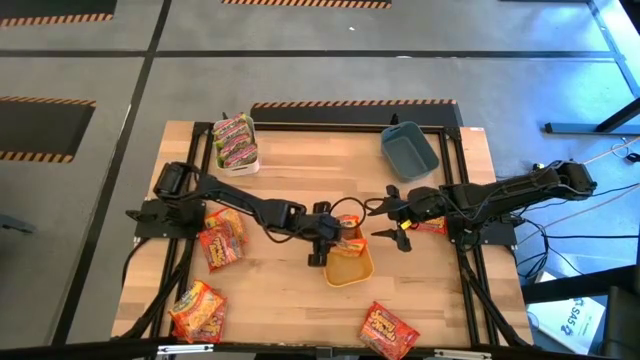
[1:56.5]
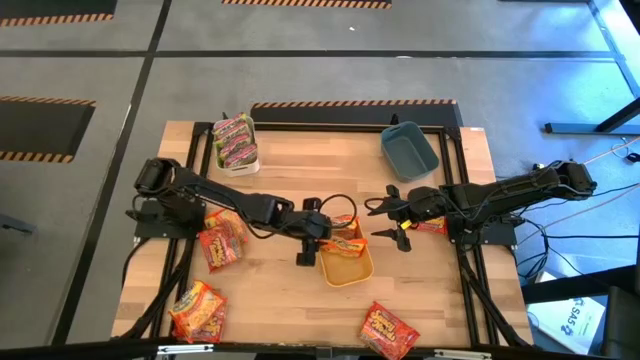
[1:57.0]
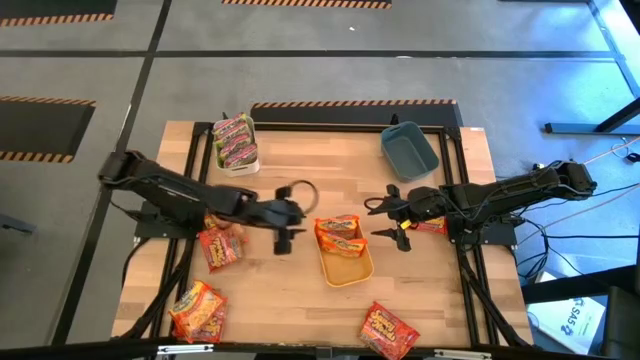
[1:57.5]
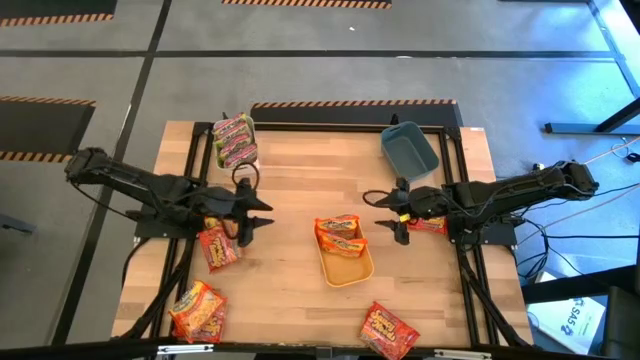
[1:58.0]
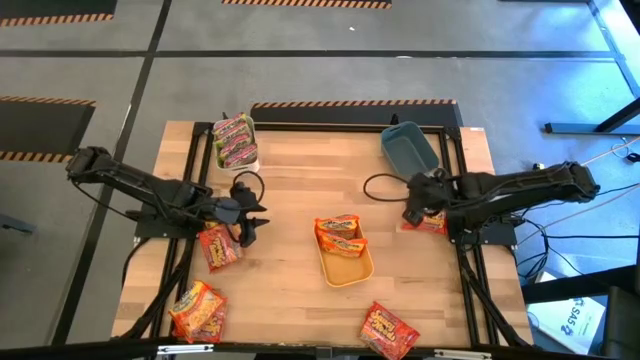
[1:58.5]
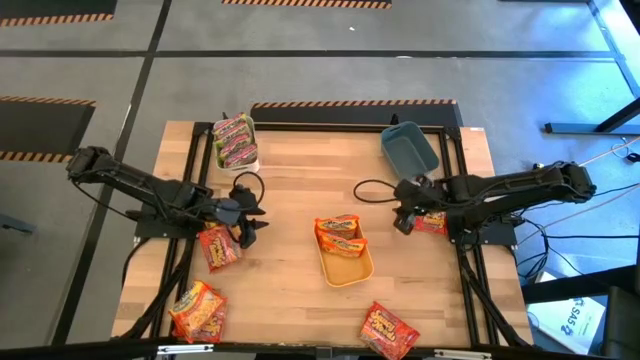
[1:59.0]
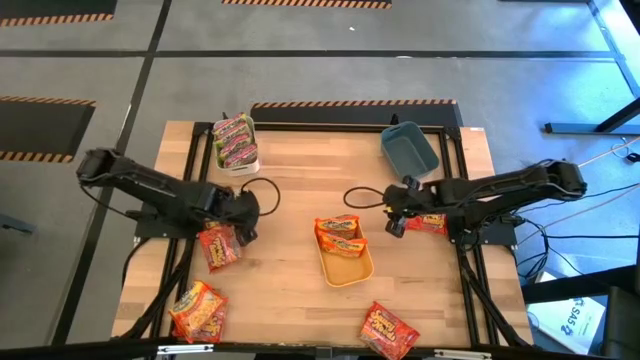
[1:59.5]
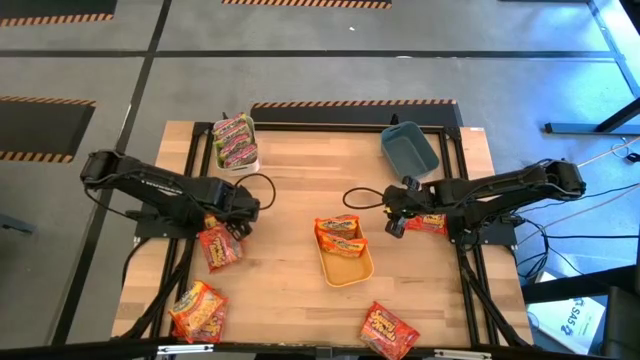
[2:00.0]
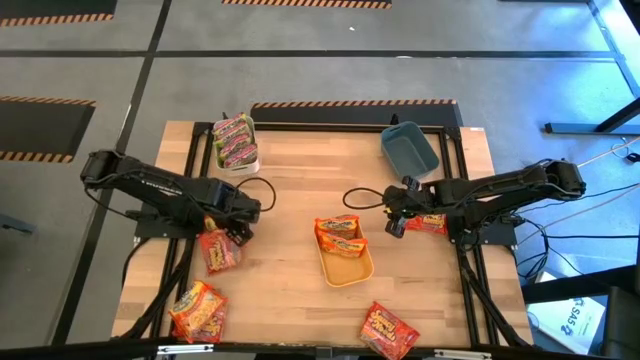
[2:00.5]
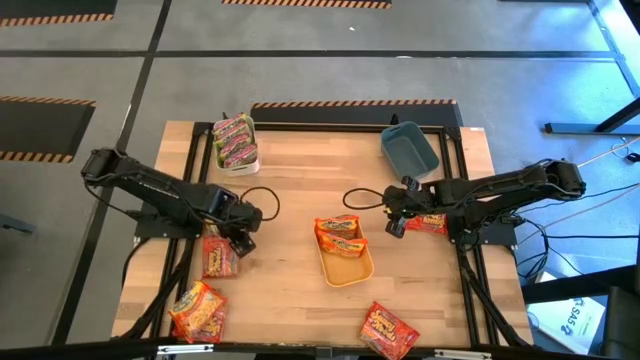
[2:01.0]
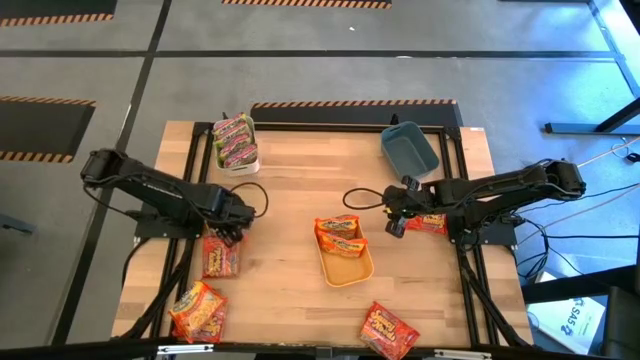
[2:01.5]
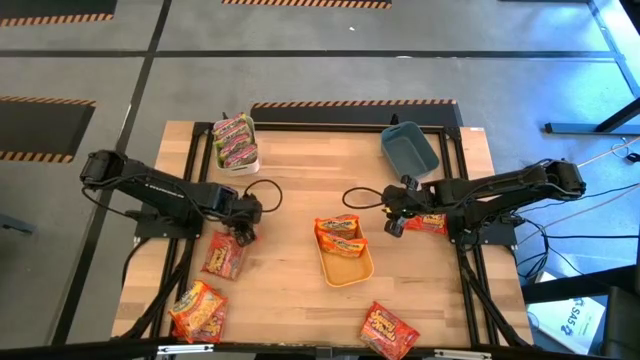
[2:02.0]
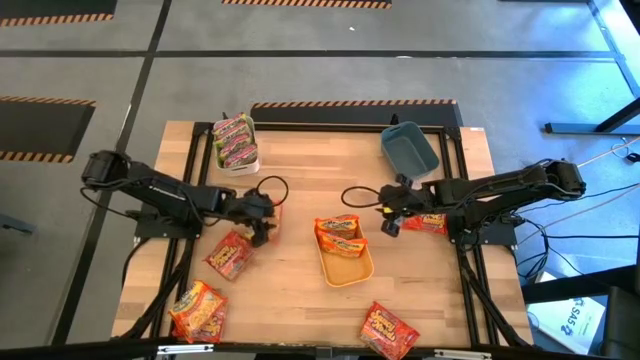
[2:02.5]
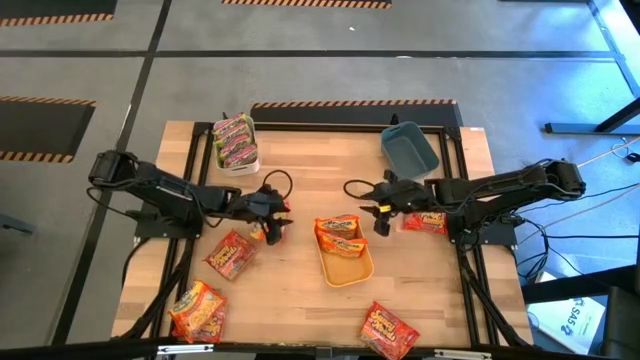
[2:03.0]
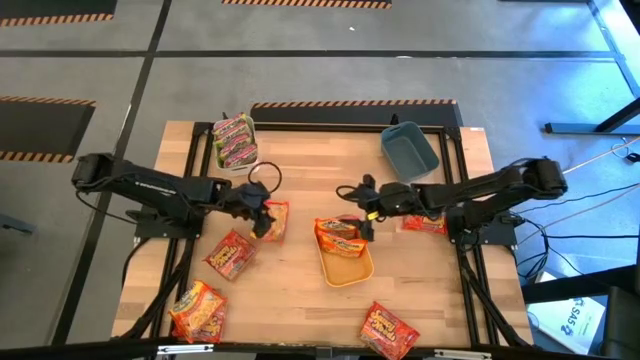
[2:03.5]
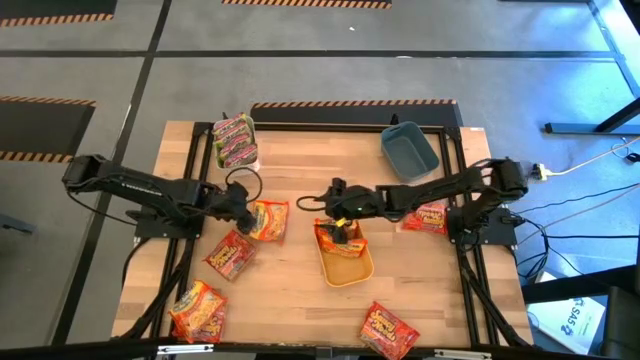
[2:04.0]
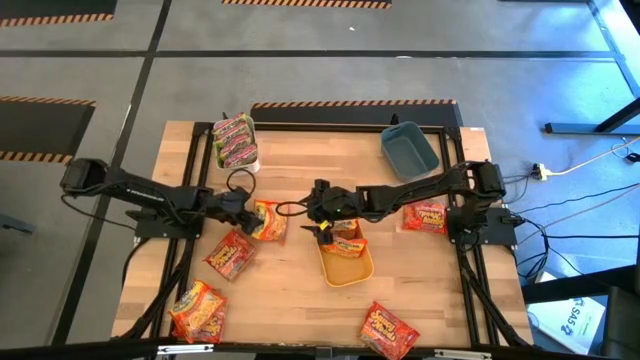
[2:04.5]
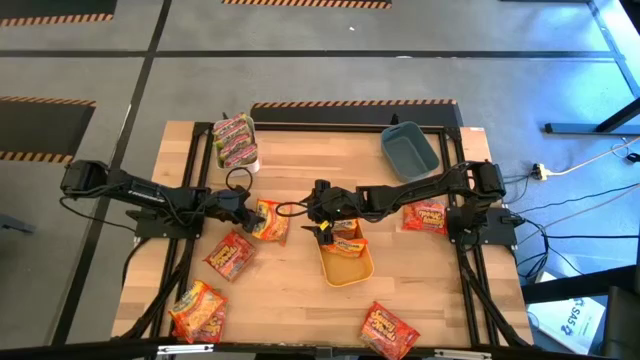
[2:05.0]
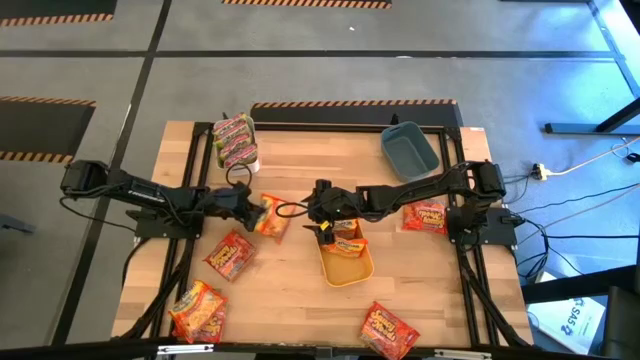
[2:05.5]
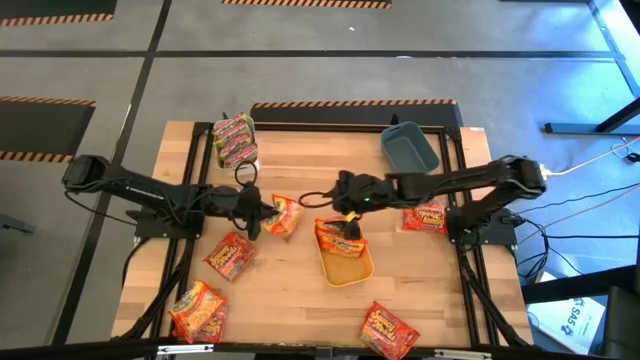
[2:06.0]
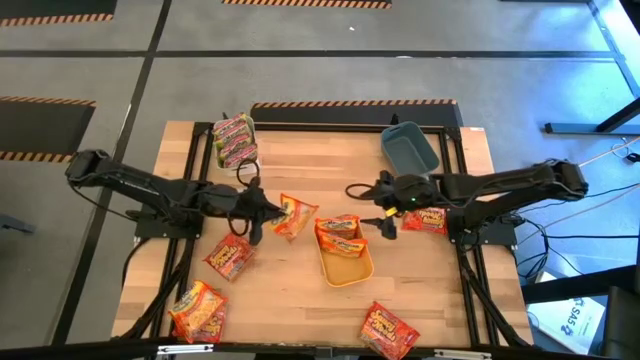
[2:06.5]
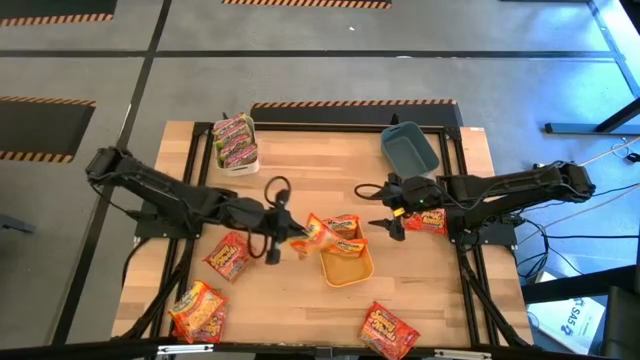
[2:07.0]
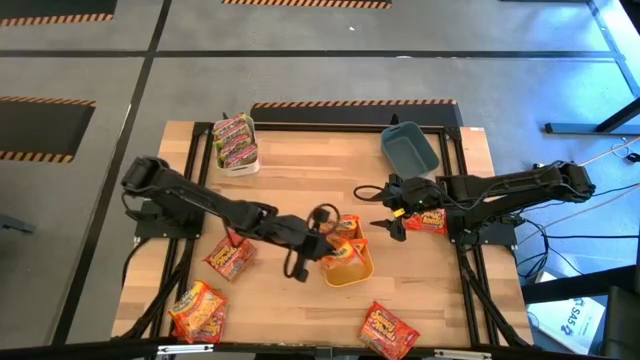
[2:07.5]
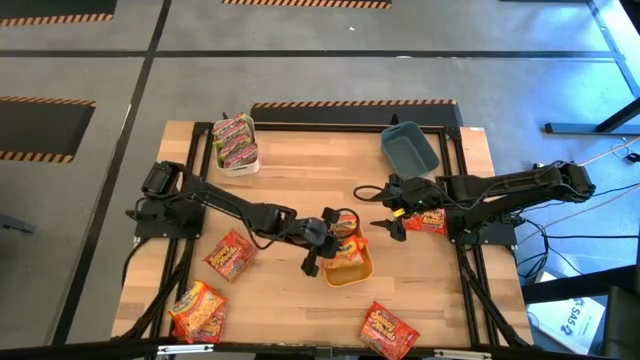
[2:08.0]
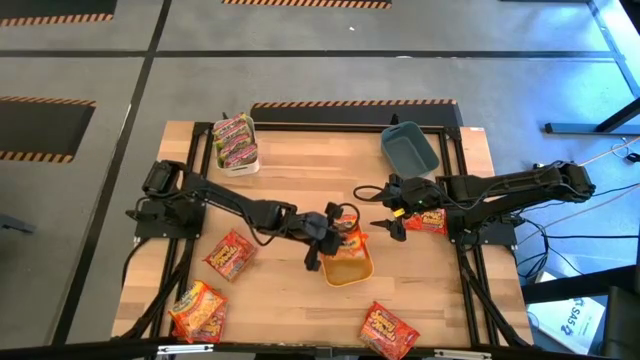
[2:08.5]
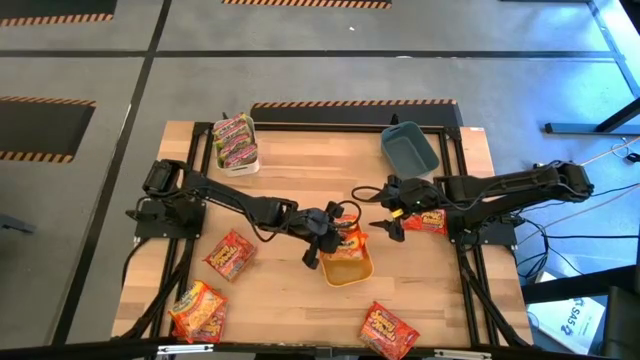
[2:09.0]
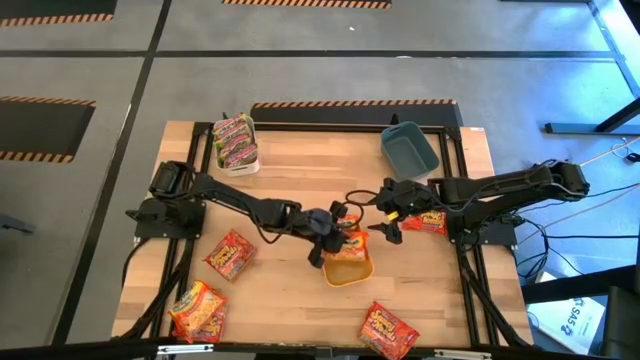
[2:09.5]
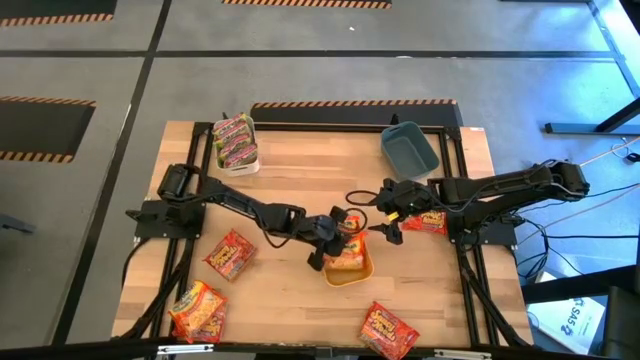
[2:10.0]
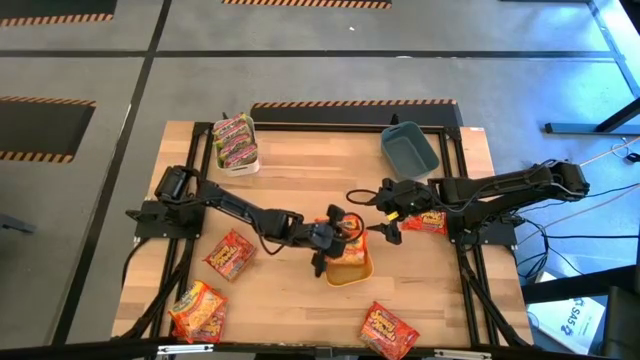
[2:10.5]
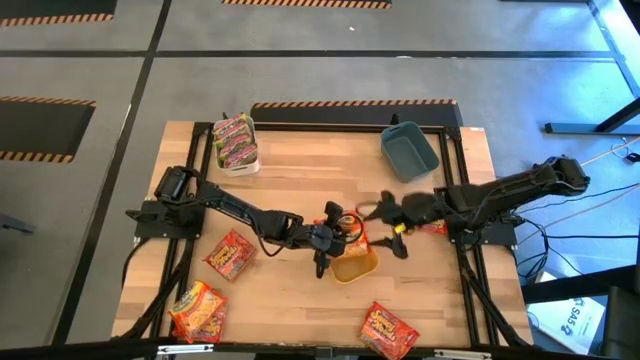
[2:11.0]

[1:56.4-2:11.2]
Task: Sort Maruchan noodles
Put the top orange noodle pack into the yellow bin

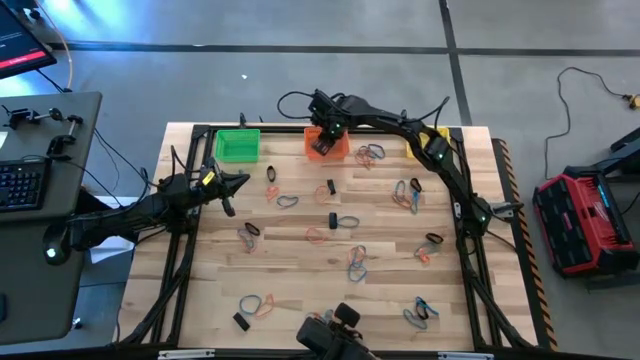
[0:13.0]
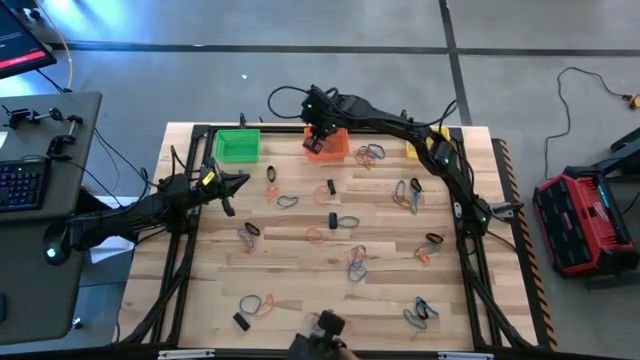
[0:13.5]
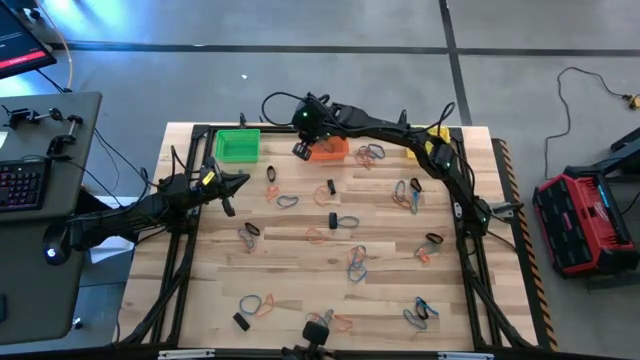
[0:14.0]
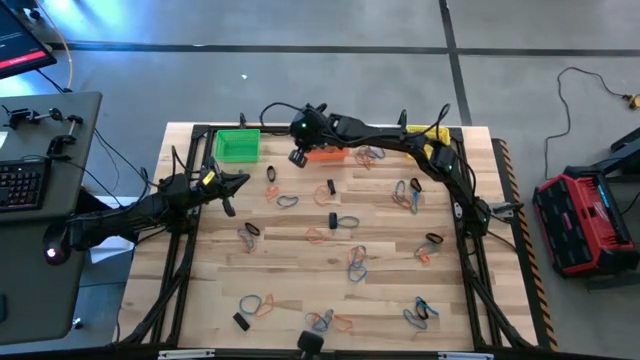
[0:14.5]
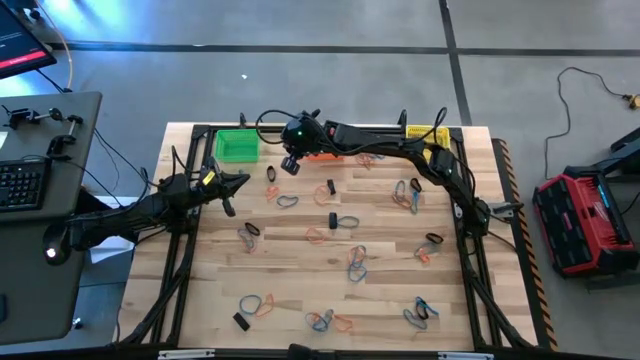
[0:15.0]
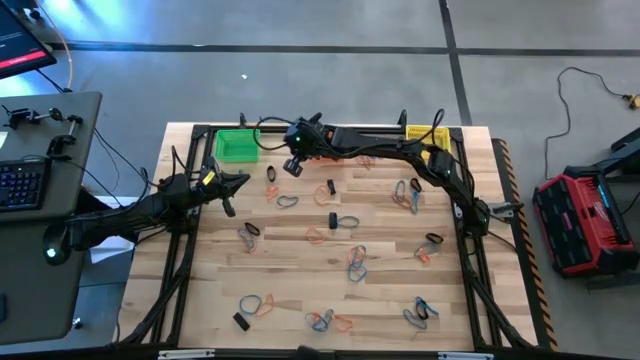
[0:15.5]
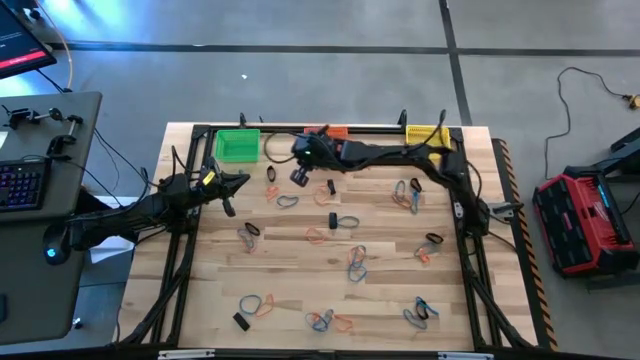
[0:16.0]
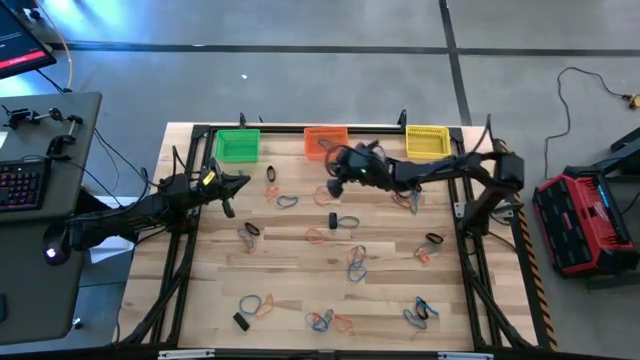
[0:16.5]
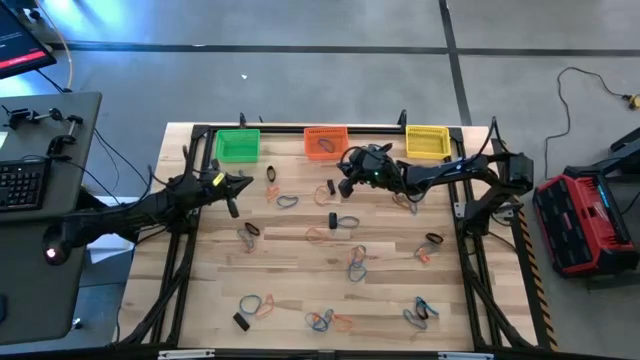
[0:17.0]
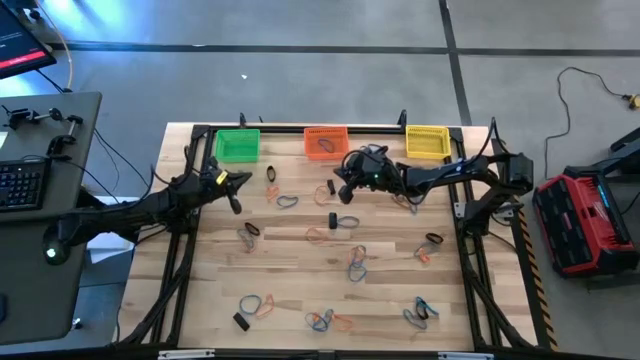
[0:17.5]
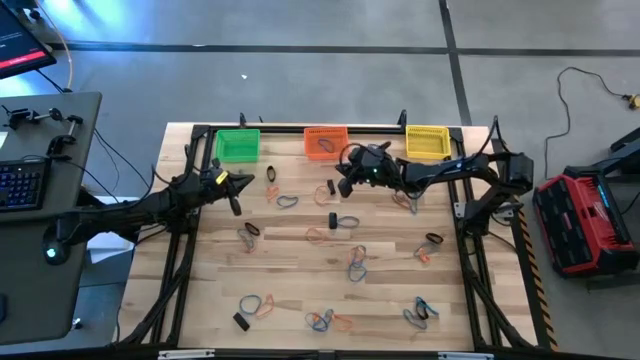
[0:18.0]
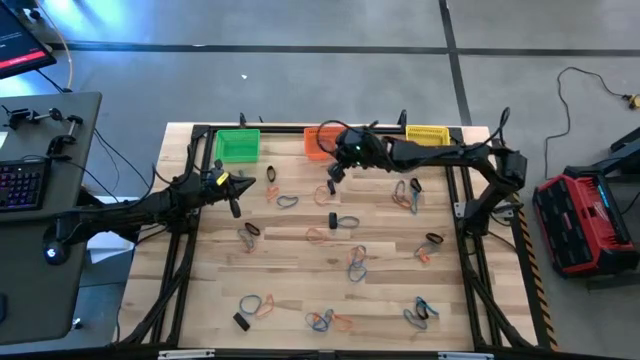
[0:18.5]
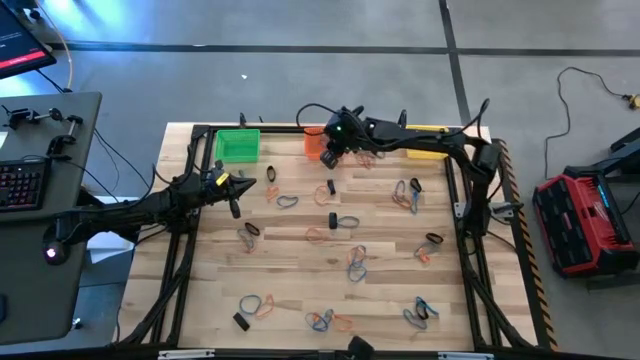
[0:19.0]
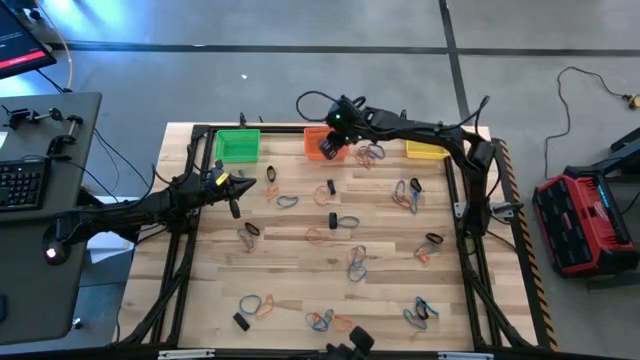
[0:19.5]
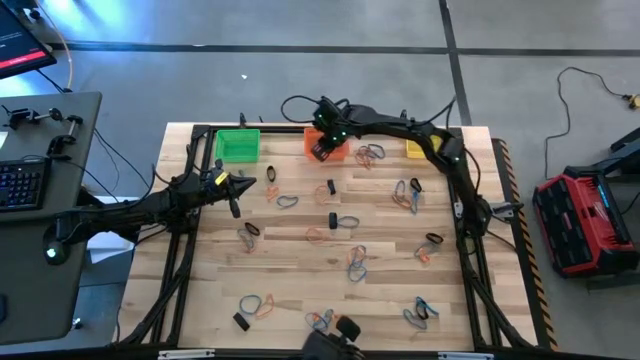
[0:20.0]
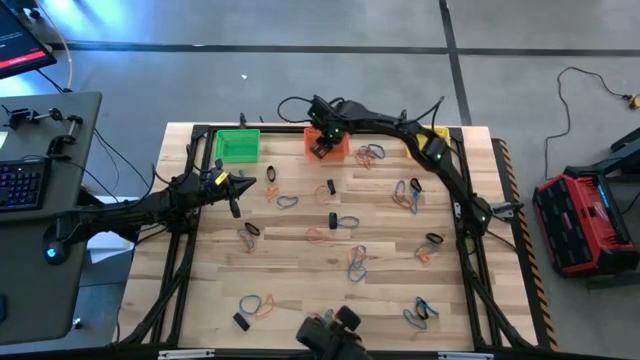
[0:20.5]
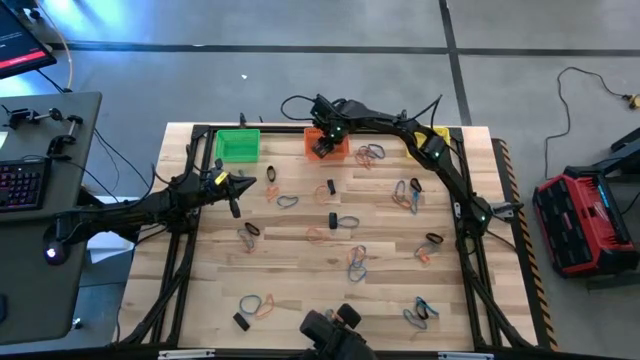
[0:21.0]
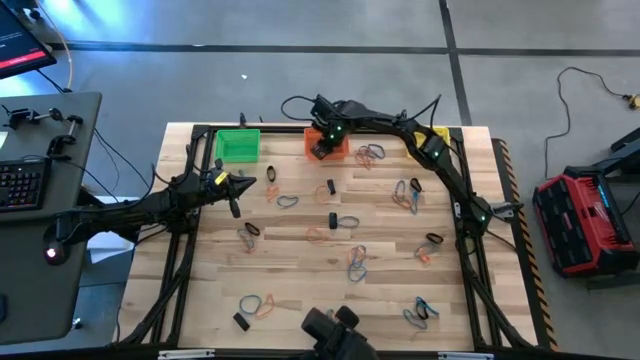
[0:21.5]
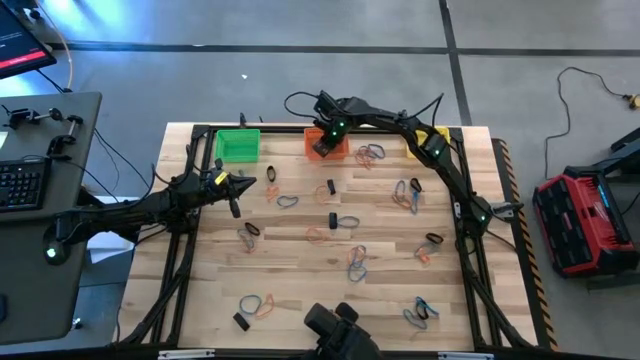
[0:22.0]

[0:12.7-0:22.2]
Task: Sort rubber bands into baskets
Put the blue rubber band from the orange bin into the yellow bin
